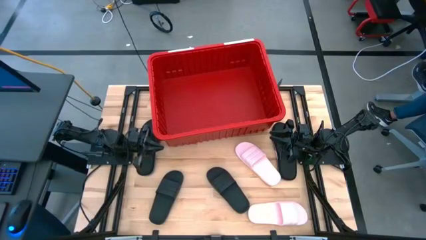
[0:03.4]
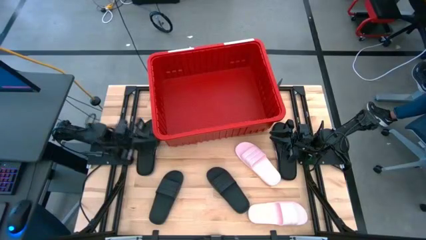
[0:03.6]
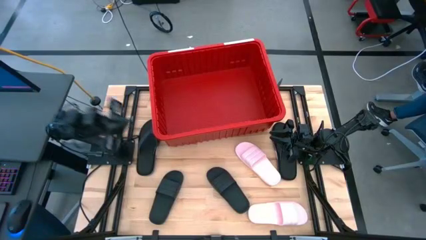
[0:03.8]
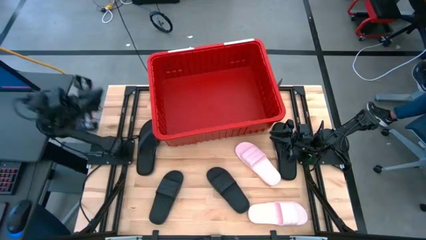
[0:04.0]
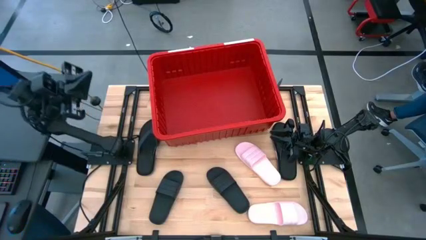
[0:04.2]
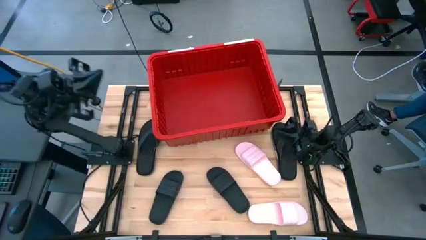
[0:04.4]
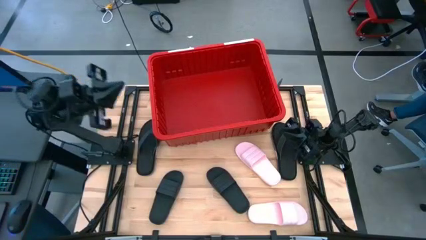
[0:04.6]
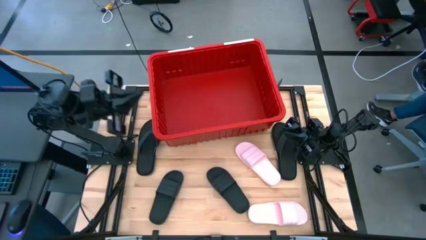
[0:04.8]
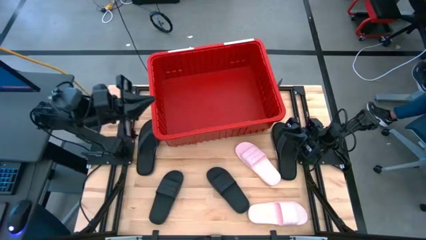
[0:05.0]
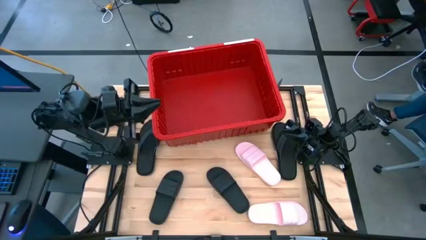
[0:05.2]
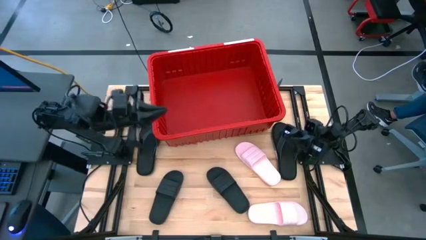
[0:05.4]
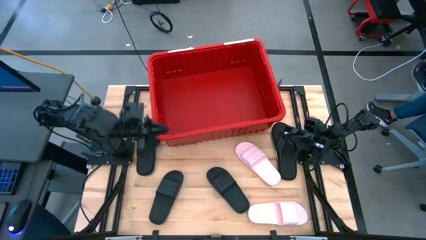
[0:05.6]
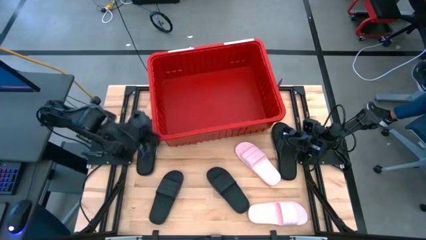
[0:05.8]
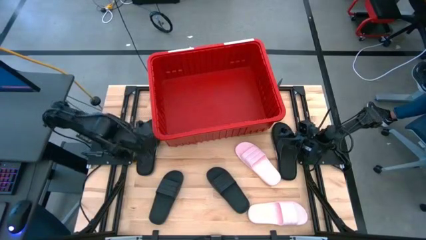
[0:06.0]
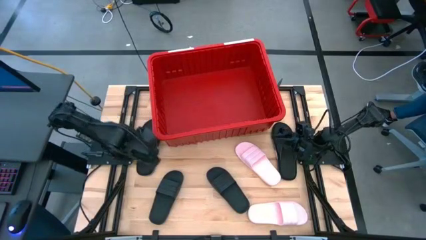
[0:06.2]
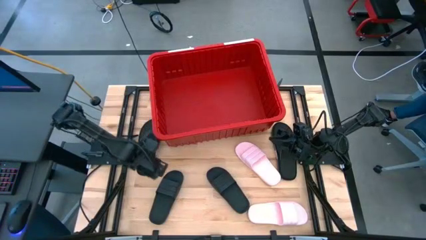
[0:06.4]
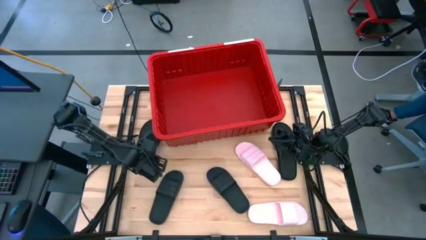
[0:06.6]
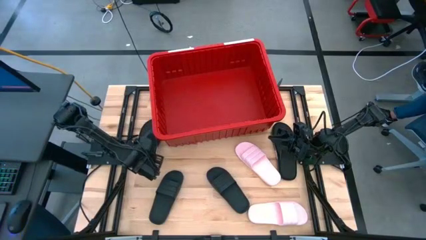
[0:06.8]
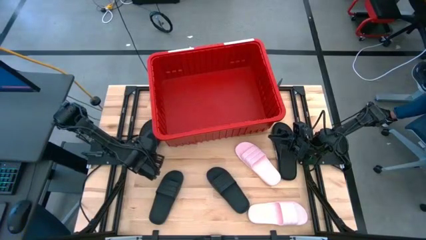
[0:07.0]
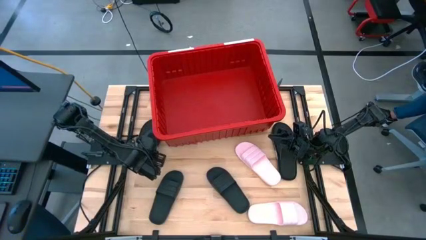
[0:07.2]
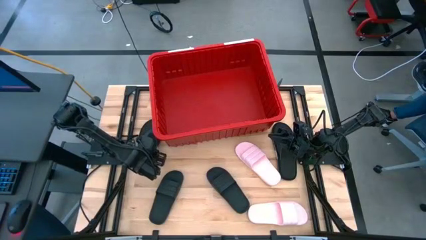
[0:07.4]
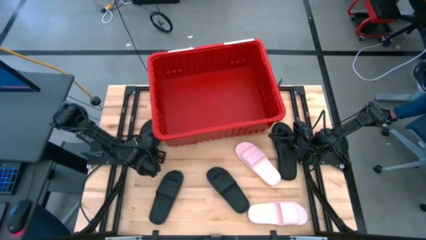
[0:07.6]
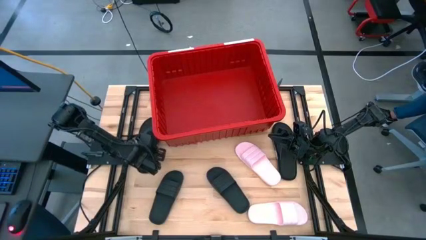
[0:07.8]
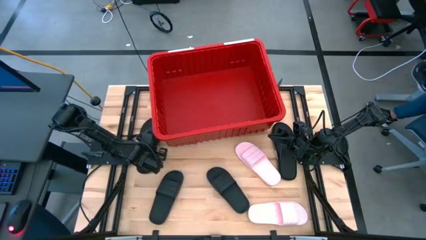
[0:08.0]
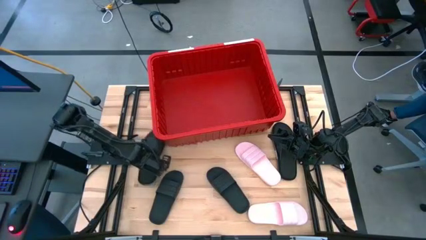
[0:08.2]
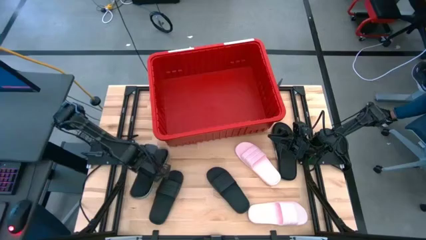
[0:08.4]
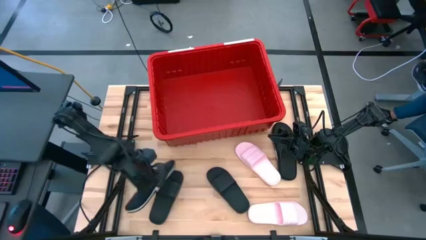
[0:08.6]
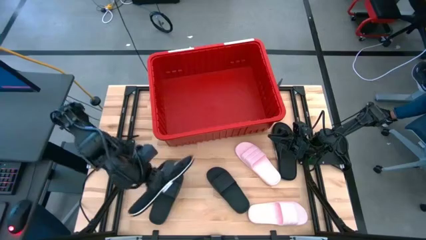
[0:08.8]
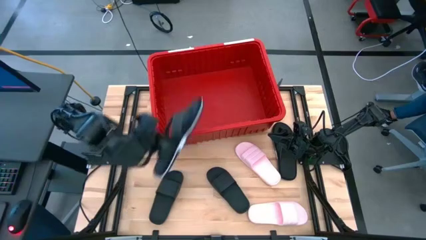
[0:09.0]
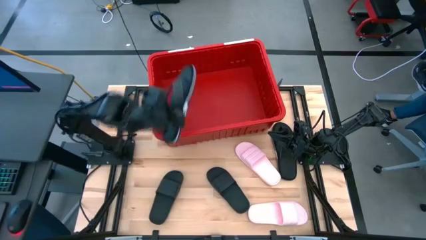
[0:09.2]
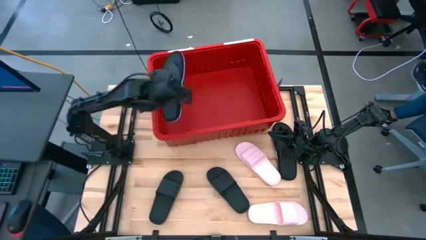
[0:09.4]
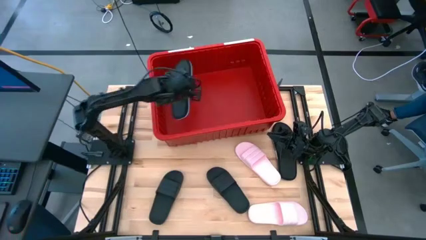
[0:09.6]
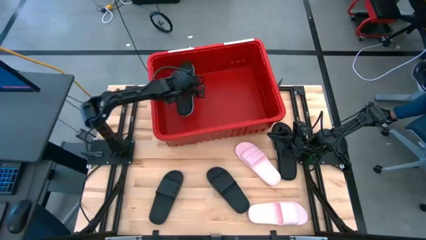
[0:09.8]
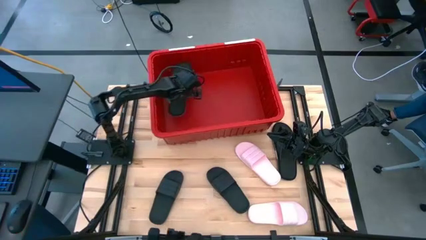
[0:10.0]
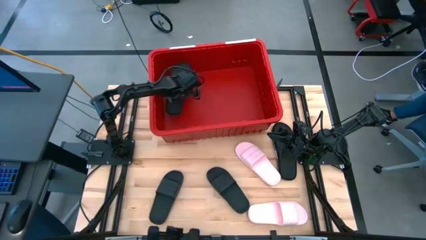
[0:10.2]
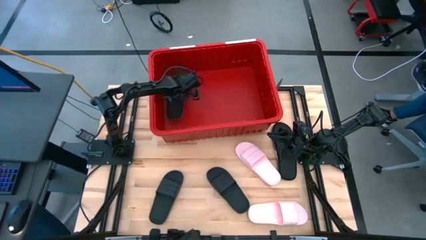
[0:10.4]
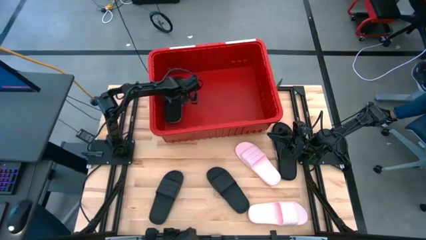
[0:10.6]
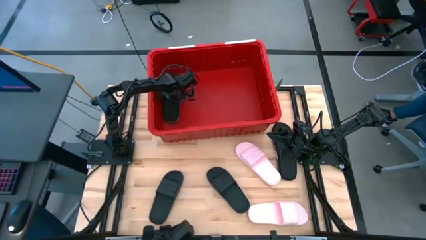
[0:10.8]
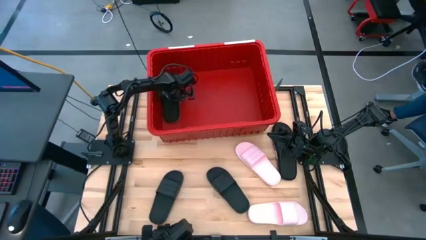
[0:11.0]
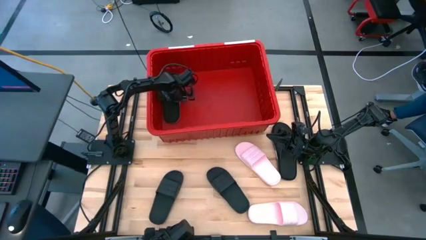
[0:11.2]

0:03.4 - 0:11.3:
Task: Pick and place slides into bin
Put the left black slipper into the red container

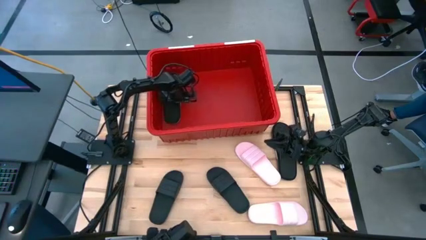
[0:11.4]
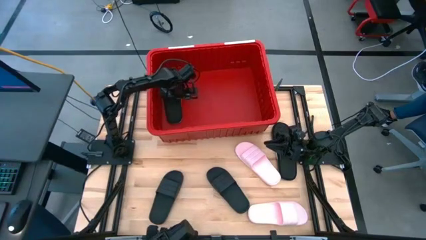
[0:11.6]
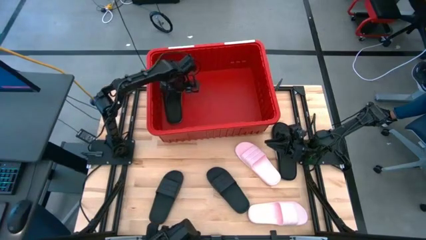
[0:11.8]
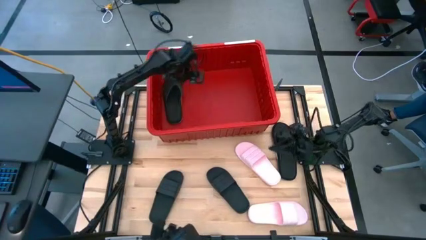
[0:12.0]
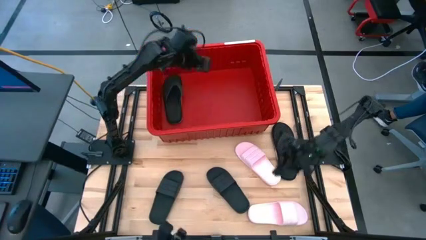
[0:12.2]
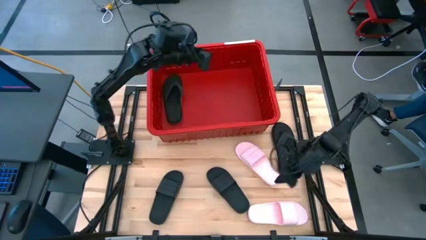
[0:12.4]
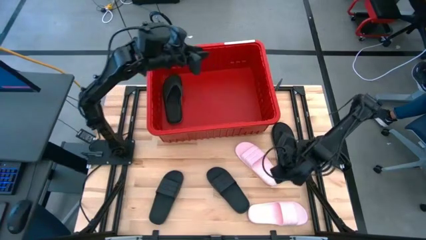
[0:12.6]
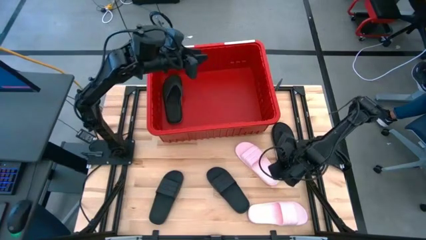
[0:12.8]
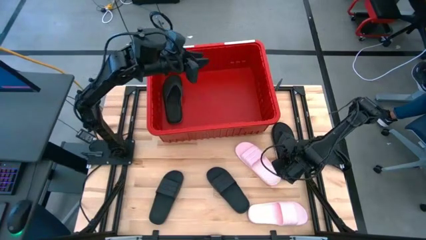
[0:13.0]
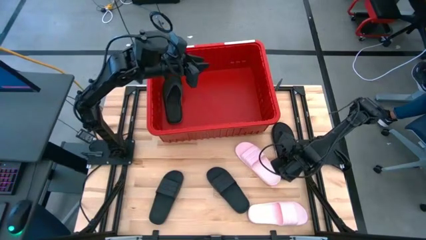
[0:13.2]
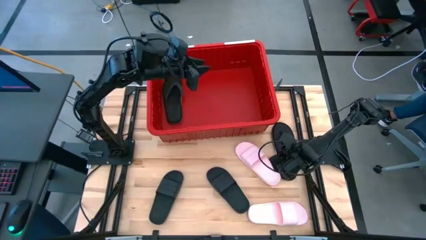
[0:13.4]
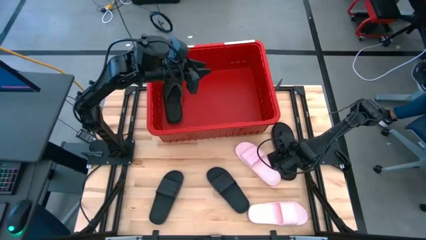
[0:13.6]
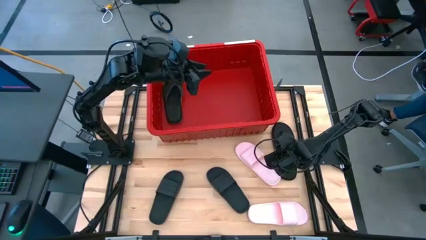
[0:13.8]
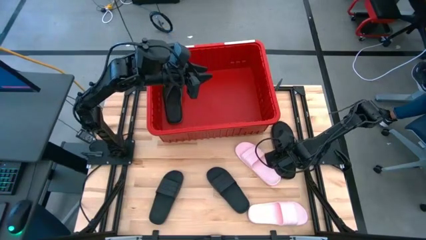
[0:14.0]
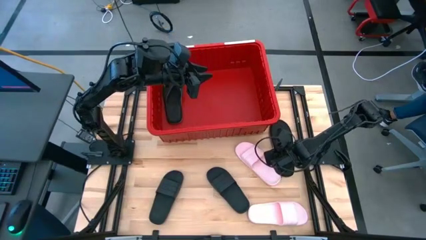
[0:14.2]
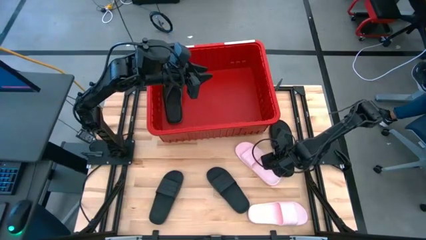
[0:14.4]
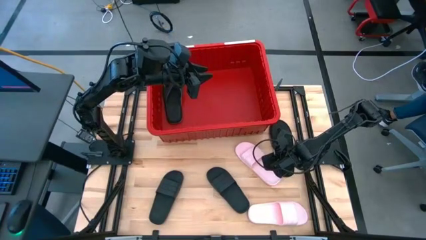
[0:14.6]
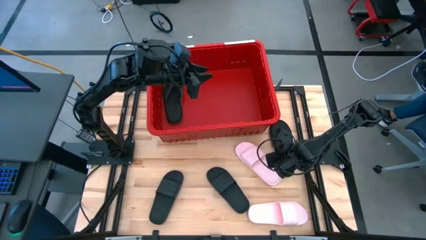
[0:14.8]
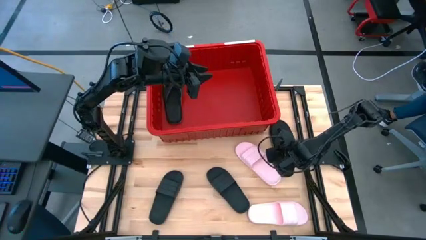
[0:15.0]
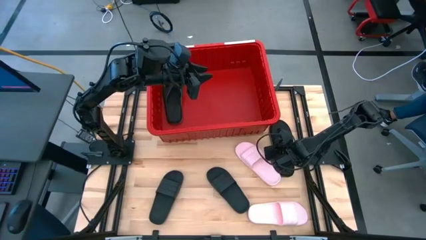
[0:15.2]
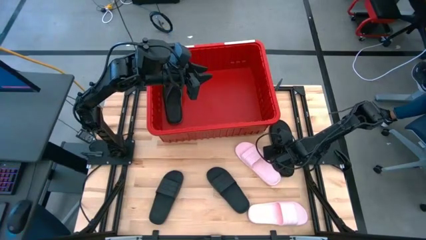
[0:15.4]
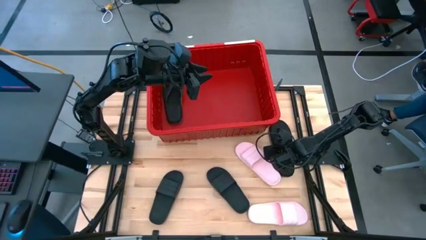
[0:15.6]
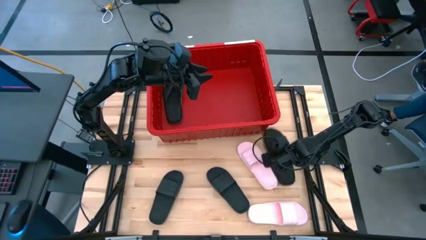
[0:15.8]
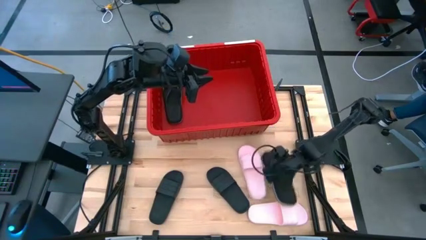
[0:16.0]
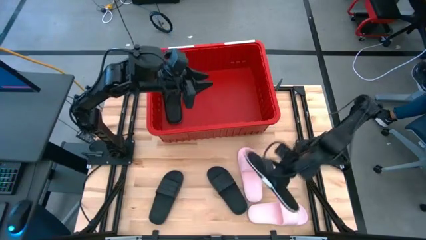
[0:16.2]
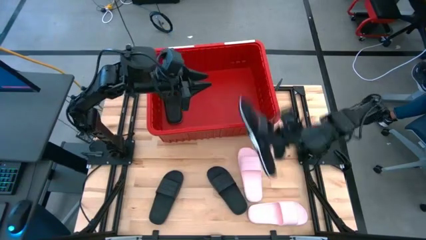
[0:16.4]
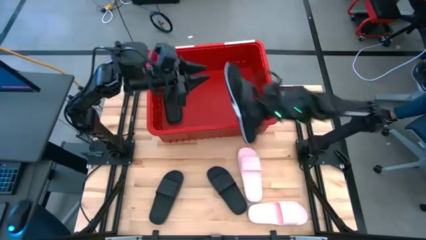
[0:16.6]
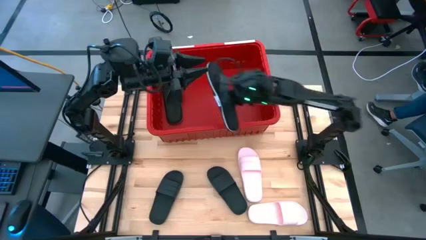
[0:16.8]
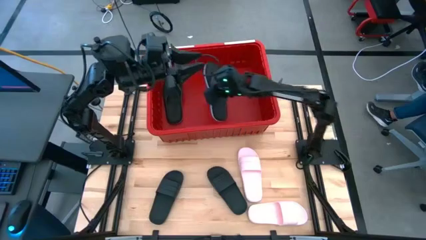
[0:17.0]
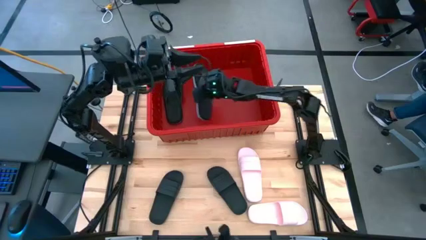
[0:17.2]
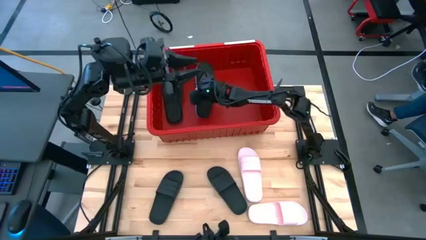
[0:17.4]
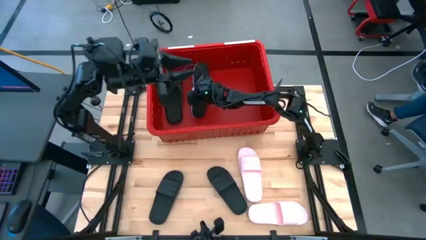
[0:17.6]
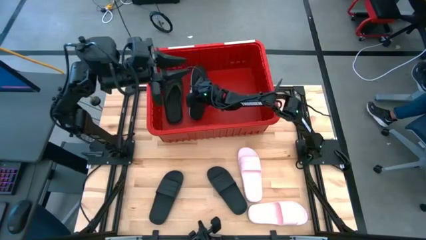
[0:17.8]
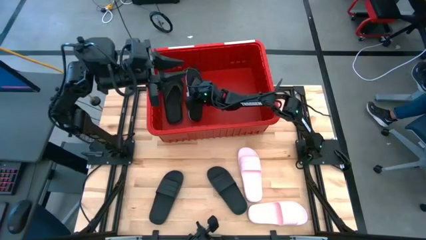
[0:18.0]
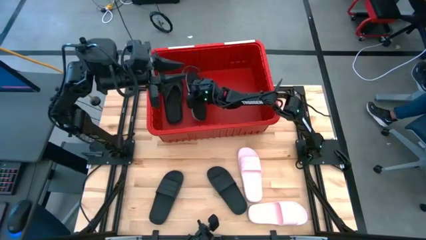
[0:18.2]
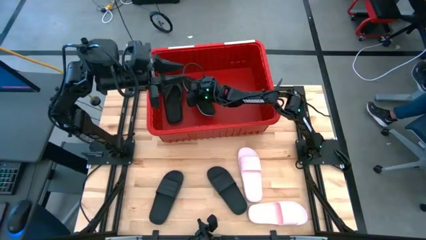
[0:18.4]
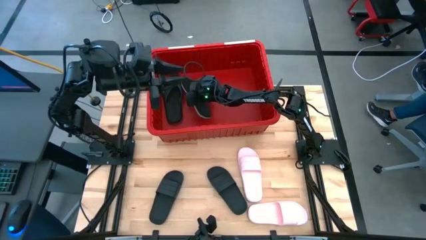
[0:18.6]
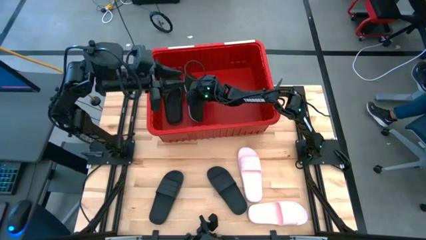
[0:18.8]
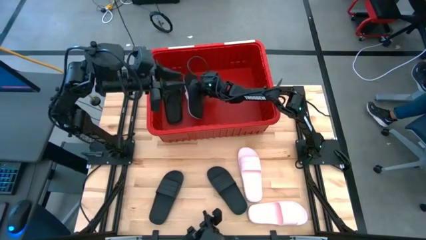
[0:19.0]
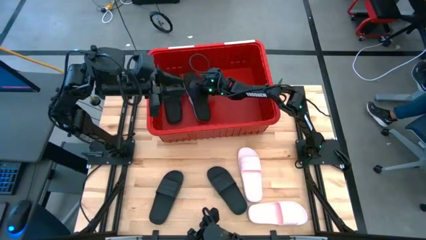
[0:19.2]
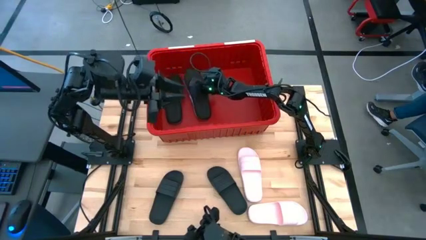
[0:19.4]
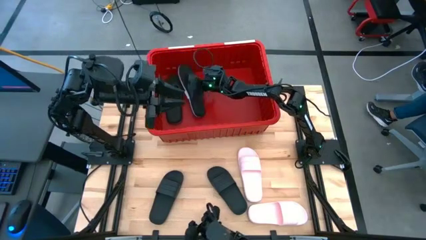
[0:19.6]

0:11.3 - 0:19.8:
Put the black slipper into the red container
